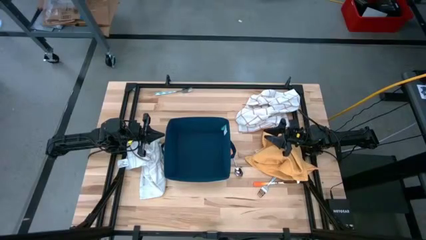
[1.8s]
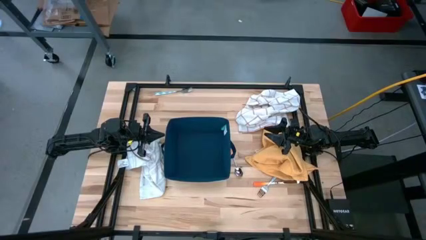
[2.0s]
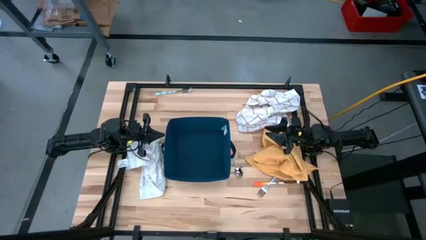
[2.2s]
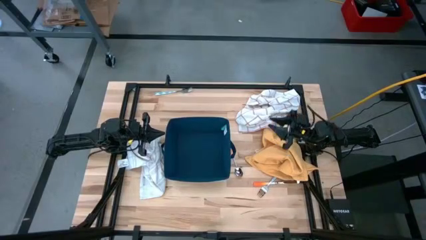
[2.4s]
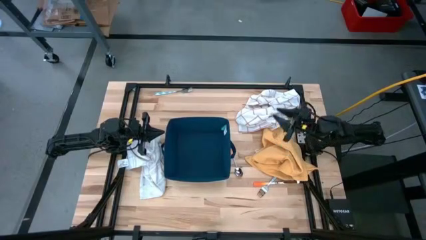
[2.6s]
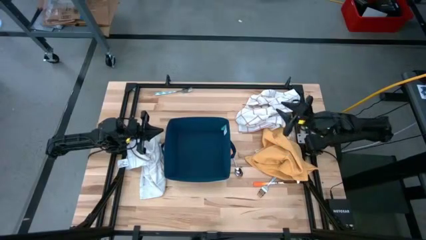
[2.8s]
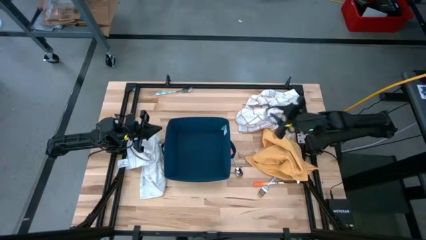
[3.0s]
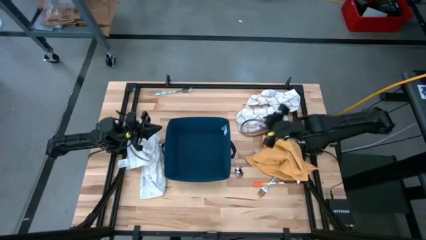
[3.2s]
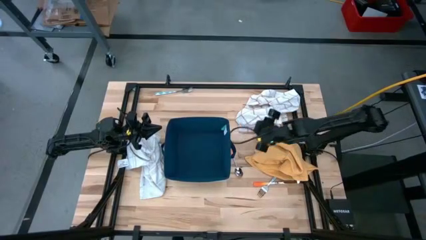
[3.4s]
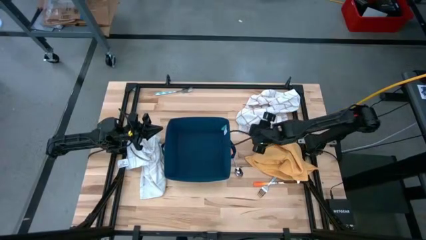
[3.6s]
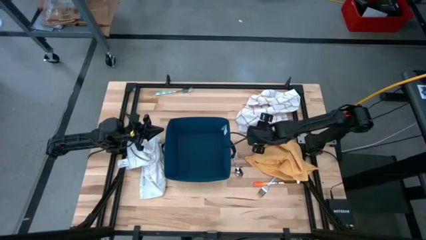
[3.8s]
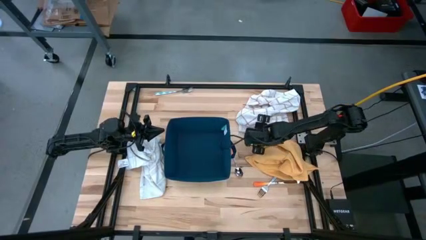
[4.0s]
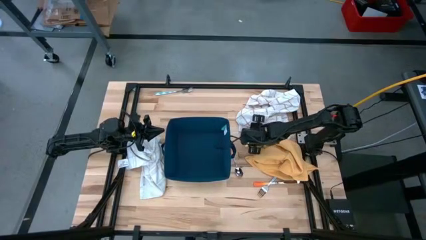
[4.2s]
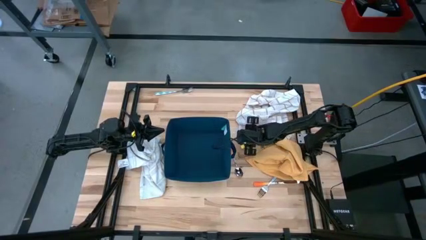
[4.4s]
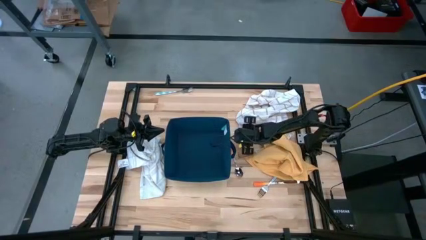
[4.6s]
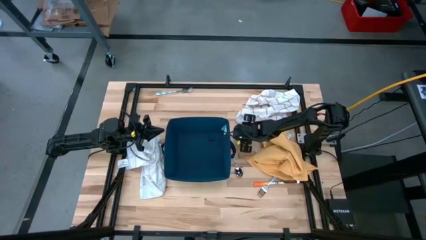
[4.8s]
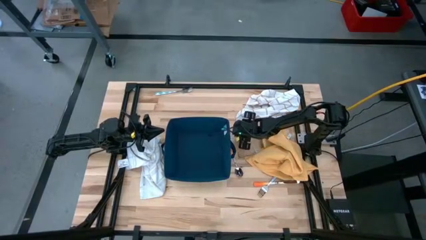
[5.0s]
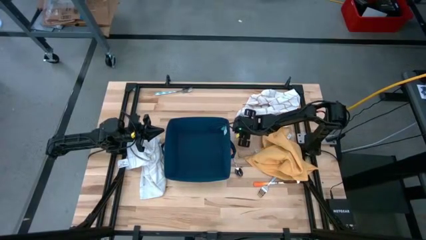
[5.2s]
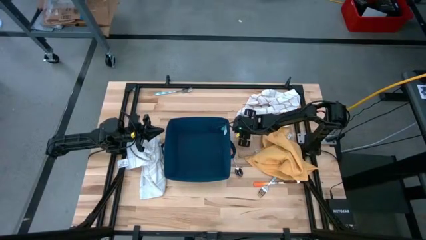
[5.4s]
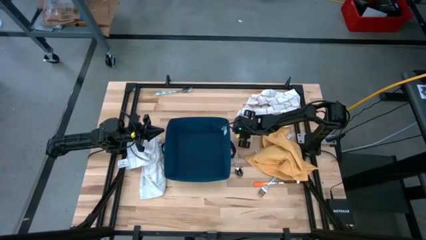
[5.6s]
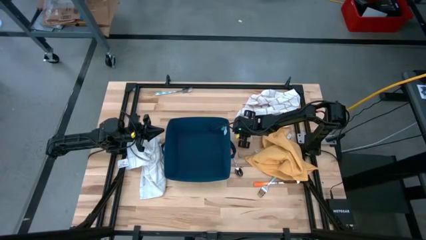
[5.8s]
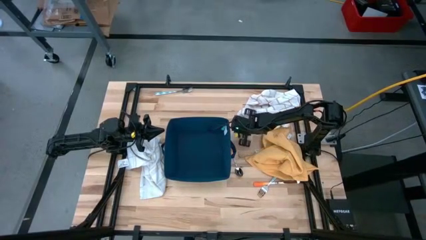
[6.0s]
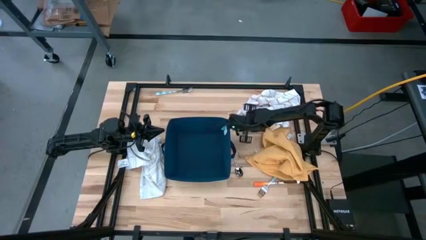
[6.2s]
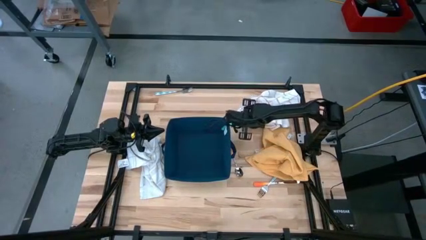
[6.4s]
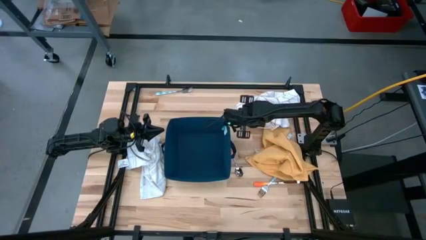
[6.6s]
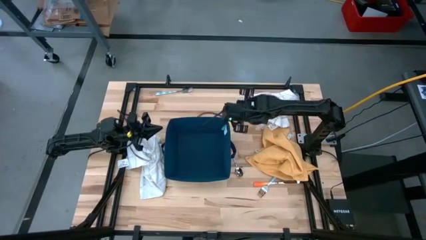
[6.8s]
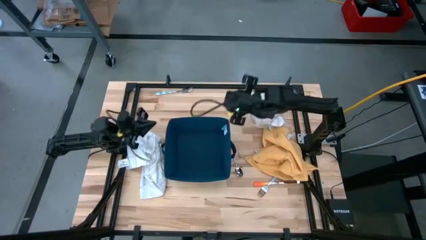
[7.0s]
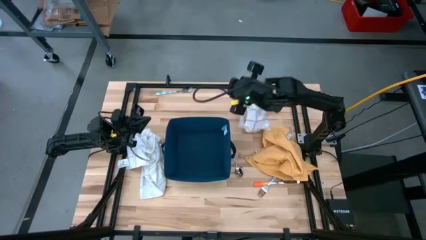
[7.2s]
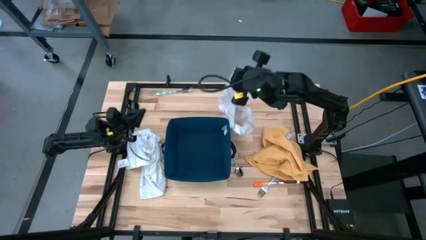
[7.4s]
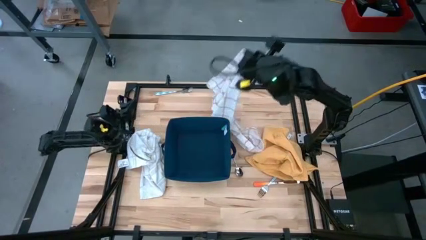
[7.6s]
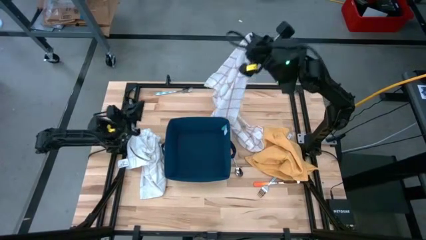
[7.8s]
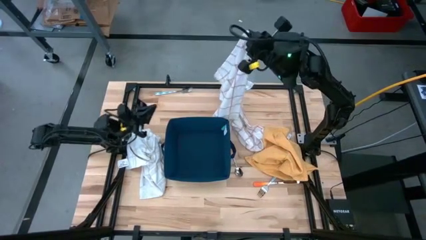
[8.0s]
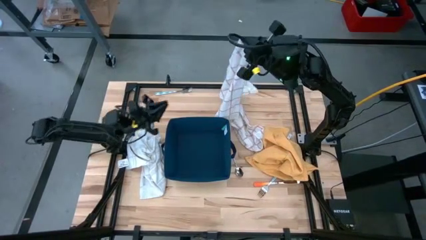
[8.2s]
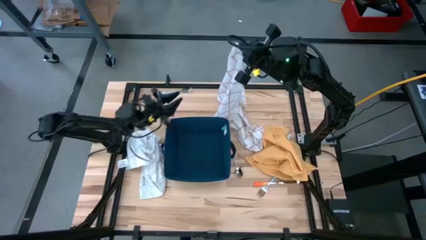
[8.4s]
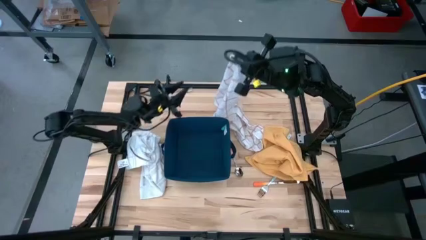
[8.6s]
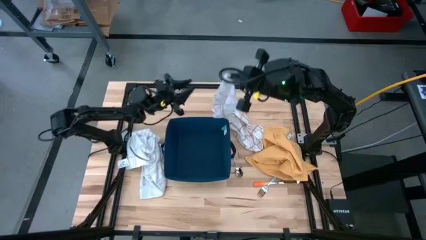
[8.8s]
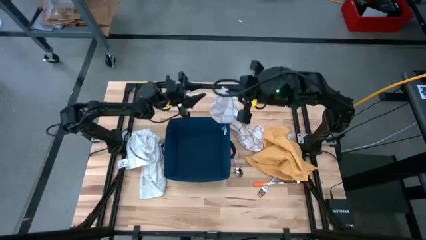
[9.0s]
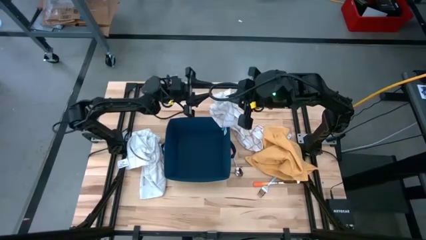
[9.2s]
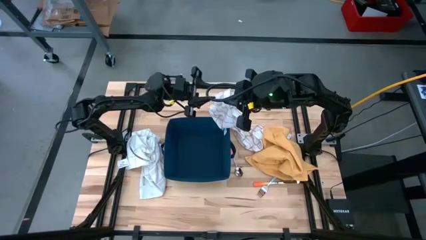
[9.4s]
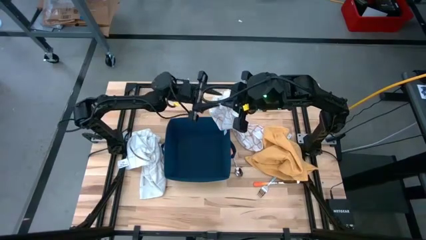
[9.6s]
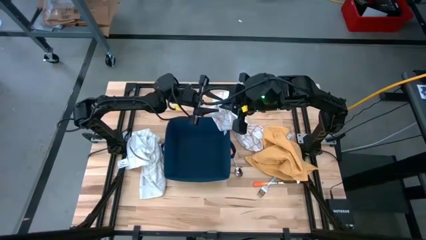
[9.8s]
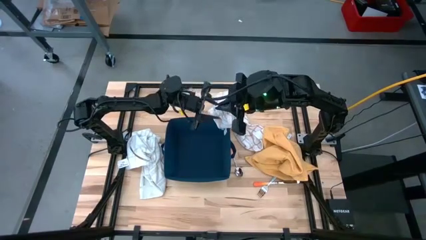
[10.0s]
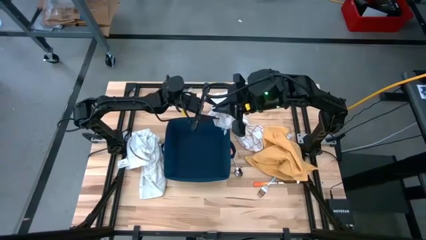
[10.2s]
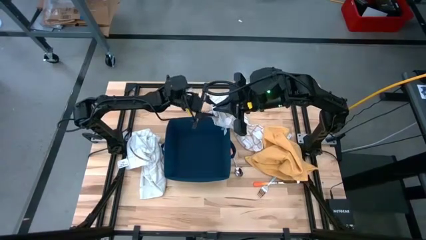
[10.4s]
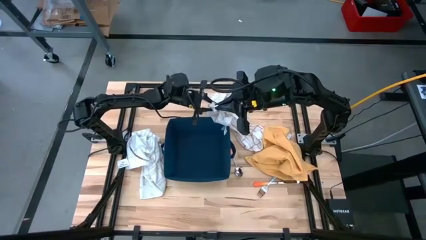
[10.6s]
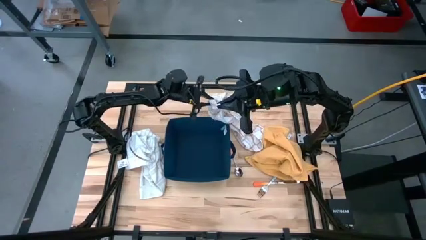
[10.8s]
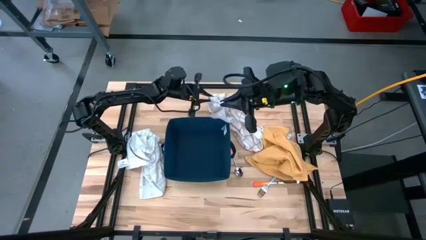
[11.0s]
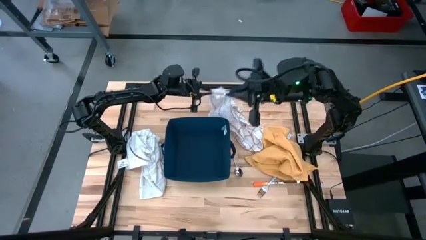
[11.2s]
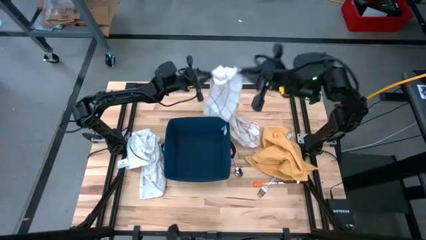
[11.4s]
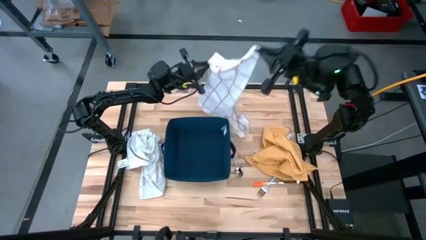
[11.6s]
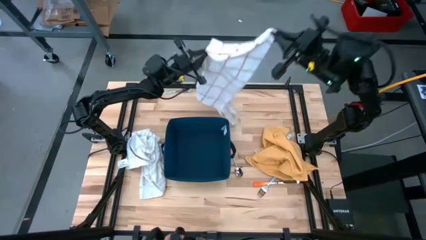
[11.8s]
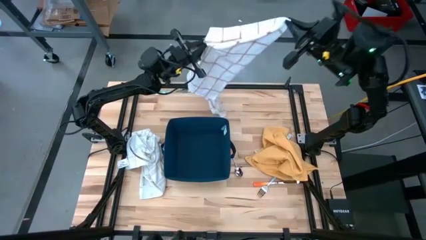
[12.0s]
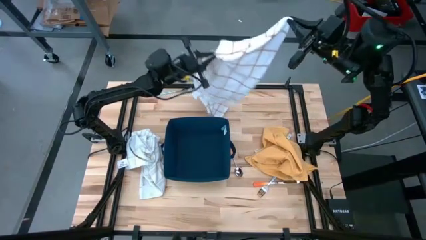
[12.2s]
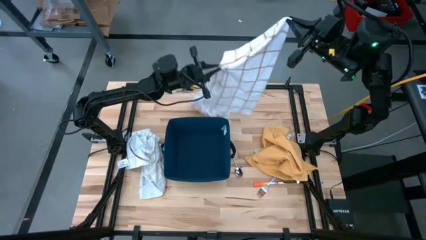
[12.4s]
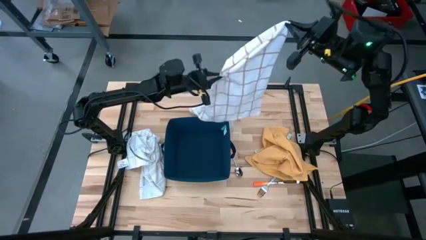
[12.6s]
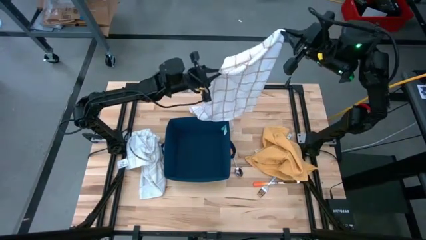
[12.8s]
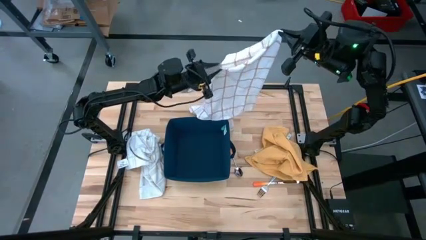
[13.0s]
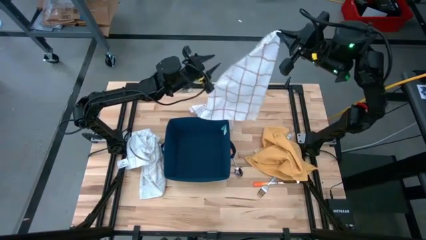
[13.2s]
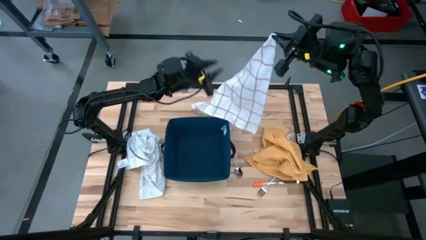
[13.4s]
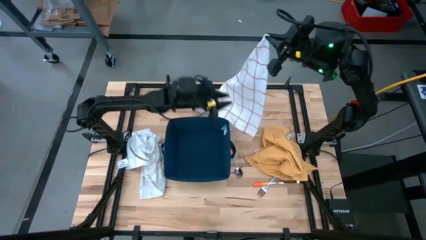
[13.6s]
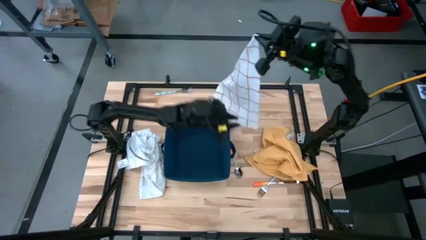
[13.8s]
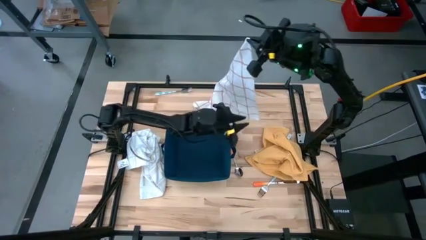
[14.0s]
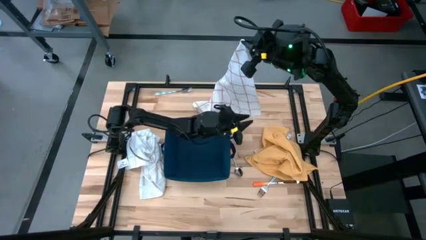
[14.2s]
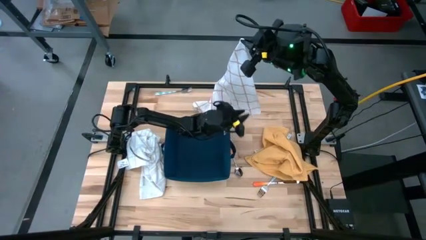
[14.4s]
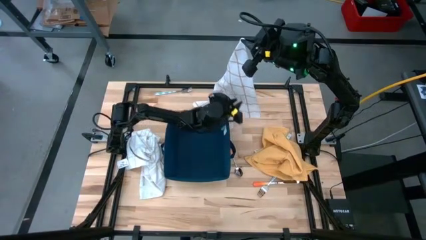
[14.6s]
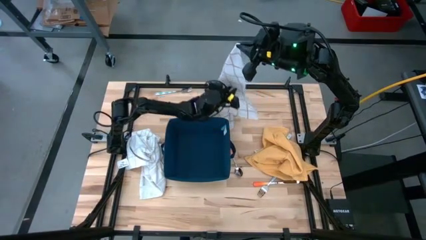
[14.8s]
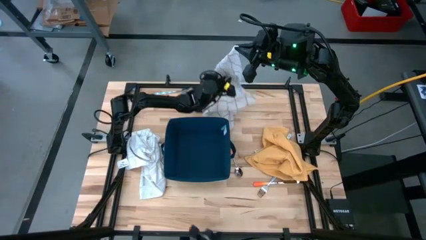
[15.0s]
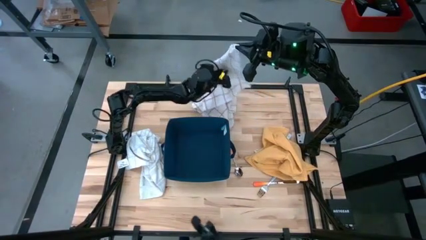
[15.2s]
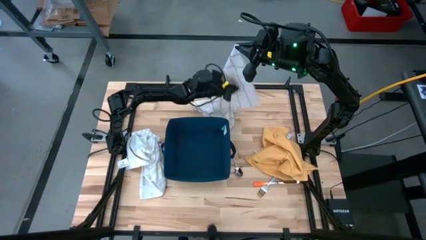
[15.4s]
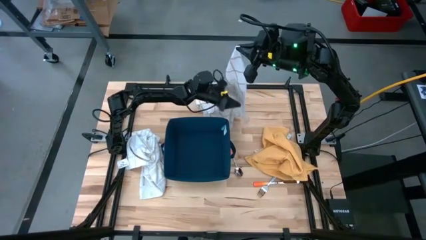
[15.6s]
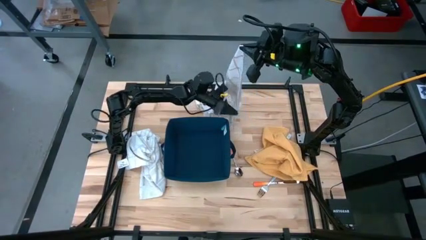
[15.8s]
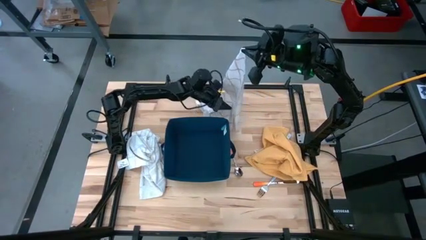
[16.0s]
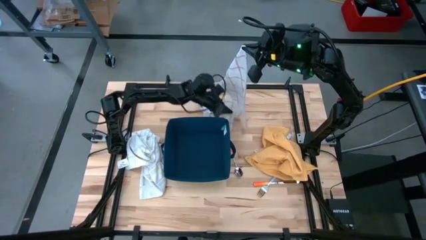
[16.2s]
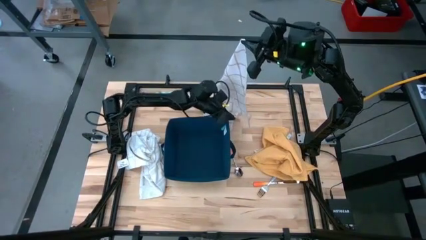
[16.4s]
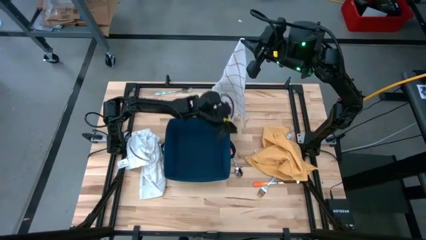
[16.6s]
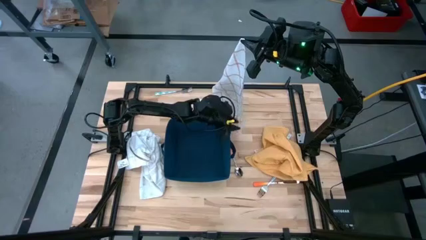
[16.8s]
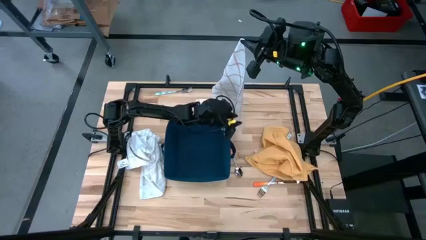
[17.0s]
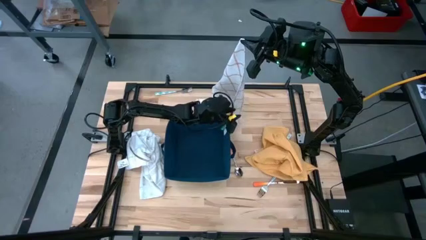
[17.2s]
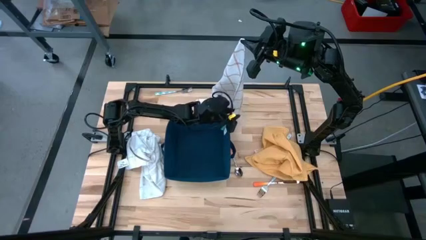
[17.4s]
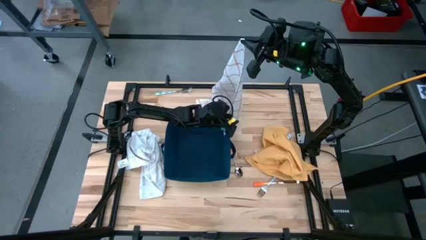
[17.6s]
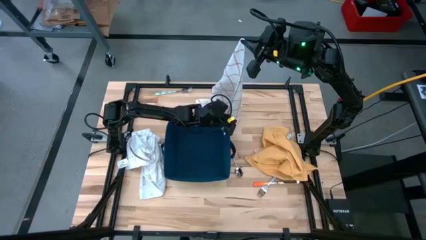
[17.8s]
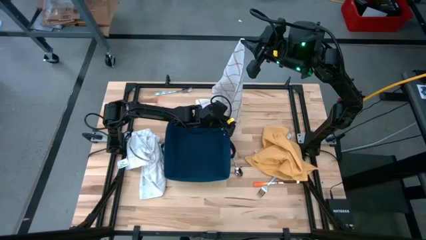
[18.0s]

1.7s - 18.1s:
Task: Fold towel
Fold the right white patterned towel
